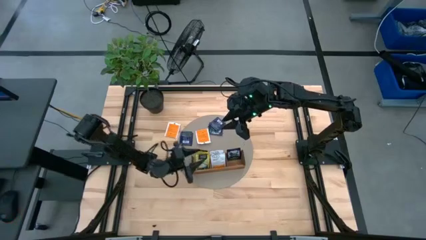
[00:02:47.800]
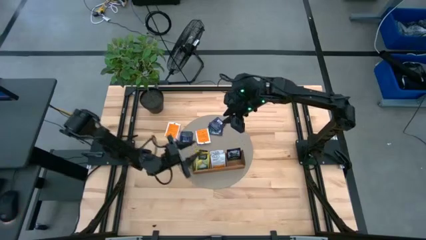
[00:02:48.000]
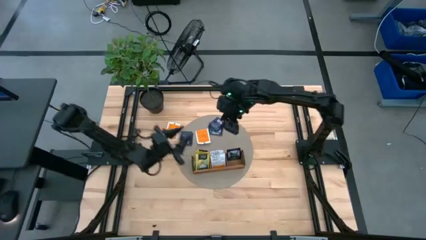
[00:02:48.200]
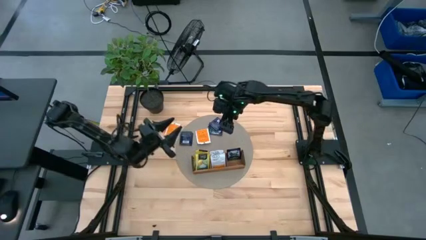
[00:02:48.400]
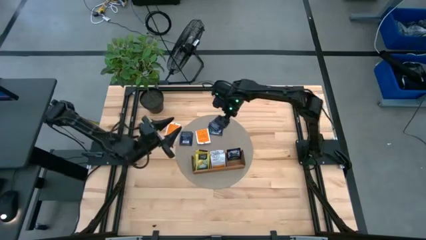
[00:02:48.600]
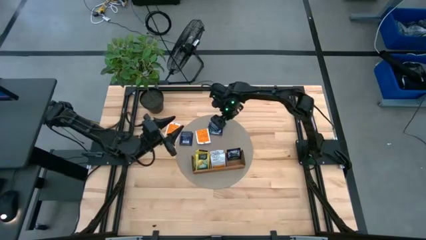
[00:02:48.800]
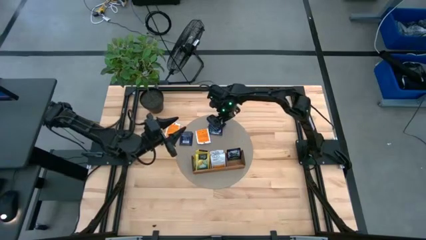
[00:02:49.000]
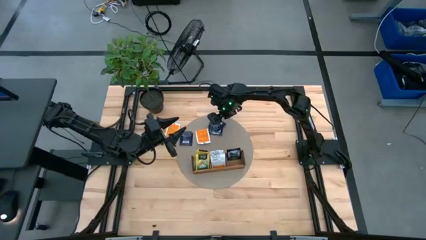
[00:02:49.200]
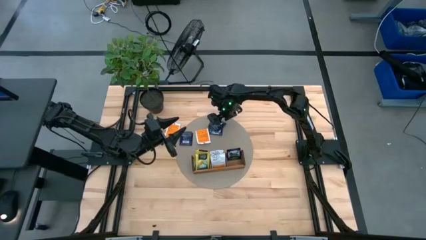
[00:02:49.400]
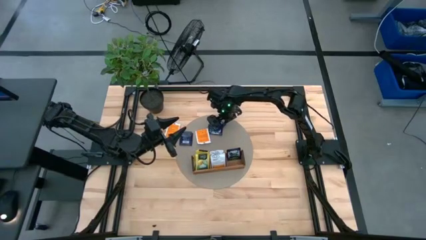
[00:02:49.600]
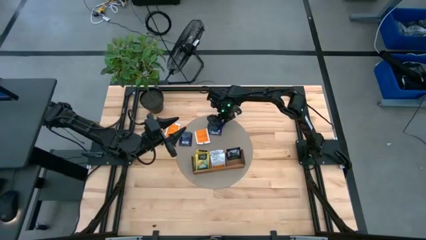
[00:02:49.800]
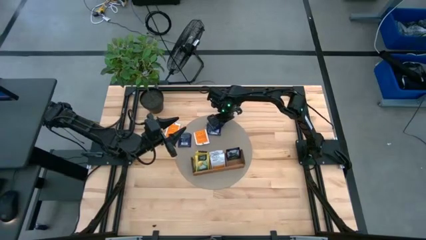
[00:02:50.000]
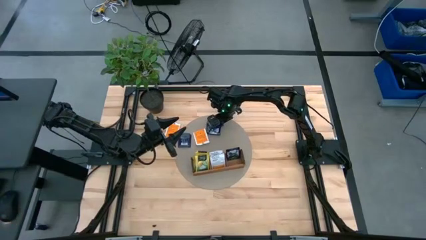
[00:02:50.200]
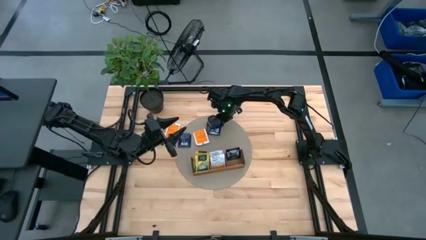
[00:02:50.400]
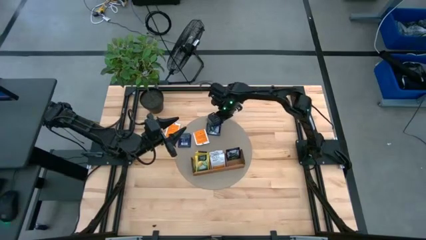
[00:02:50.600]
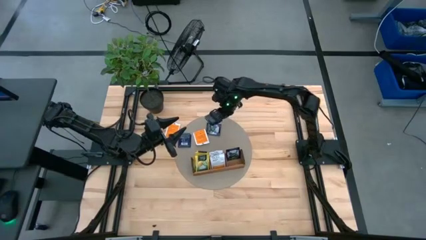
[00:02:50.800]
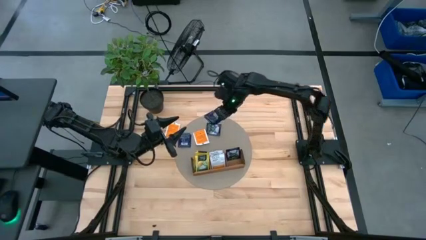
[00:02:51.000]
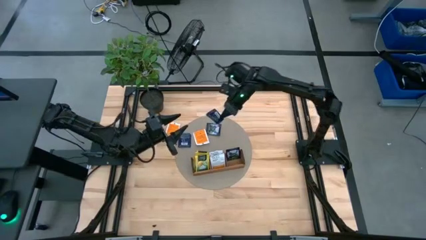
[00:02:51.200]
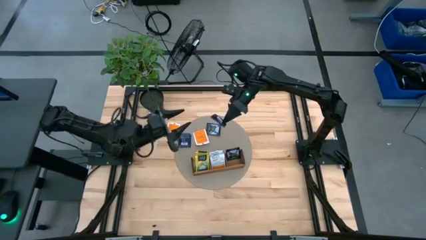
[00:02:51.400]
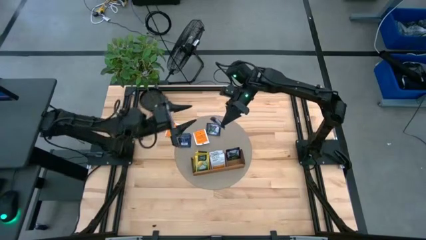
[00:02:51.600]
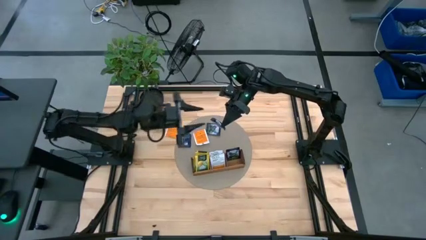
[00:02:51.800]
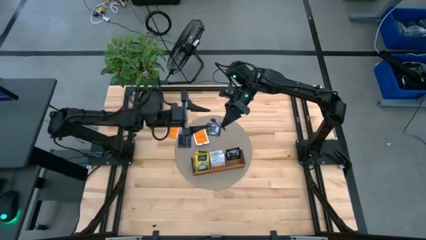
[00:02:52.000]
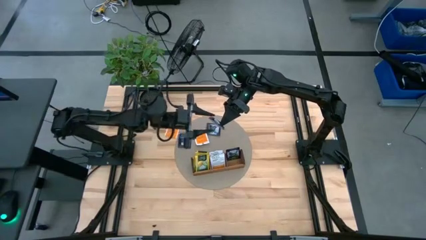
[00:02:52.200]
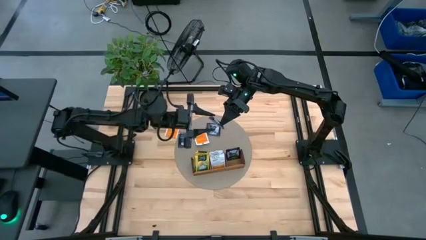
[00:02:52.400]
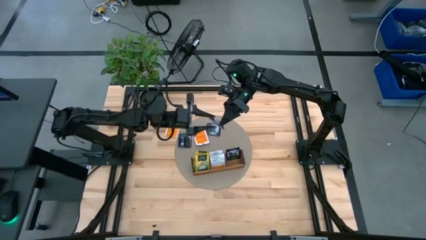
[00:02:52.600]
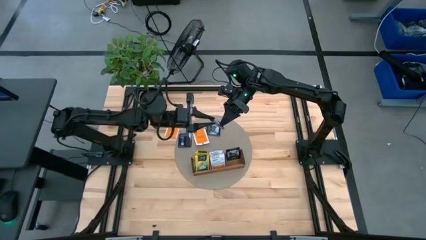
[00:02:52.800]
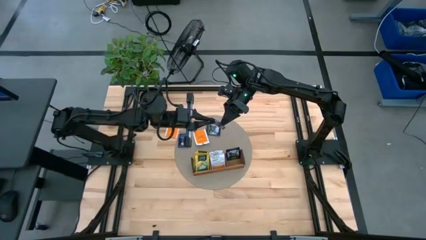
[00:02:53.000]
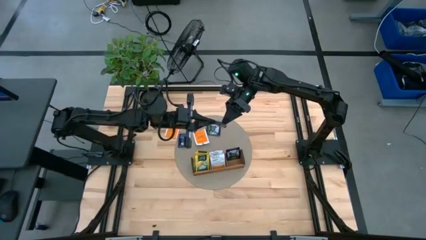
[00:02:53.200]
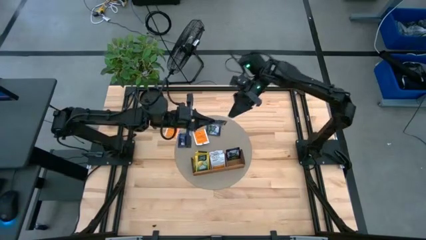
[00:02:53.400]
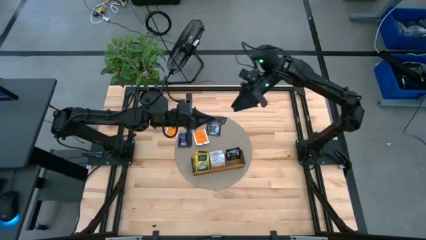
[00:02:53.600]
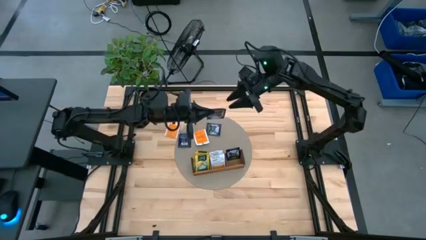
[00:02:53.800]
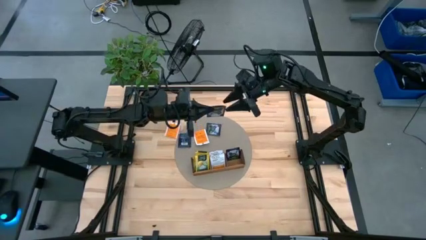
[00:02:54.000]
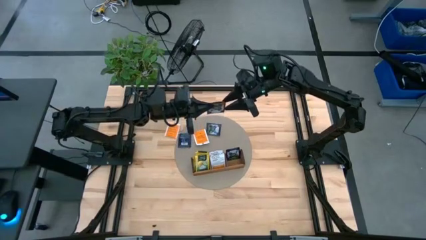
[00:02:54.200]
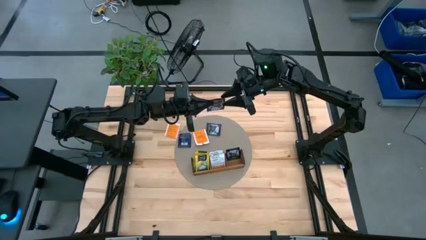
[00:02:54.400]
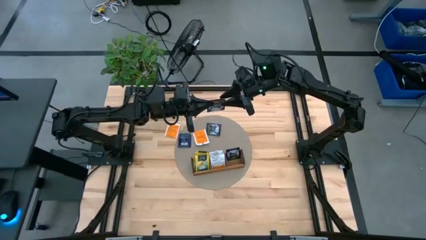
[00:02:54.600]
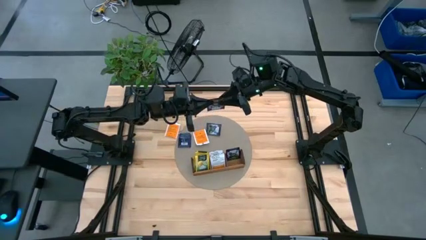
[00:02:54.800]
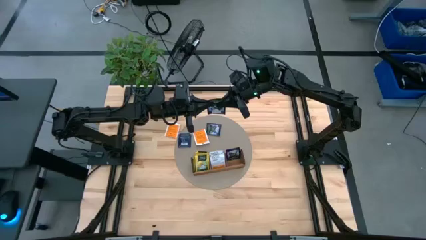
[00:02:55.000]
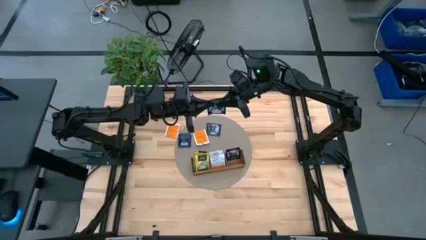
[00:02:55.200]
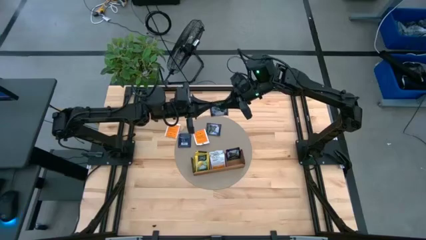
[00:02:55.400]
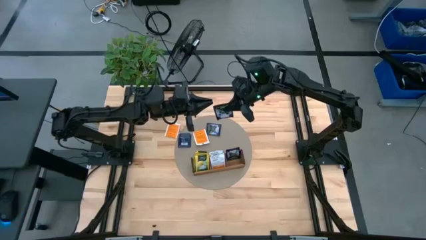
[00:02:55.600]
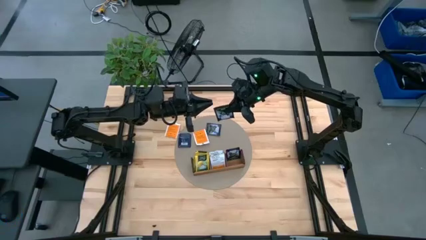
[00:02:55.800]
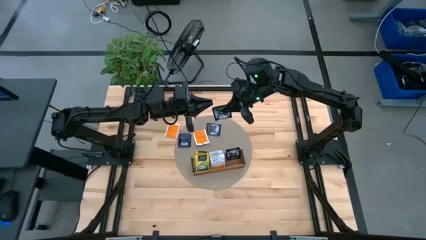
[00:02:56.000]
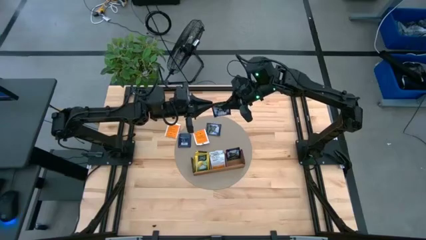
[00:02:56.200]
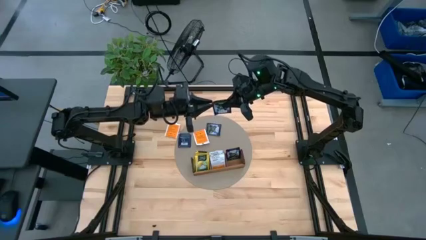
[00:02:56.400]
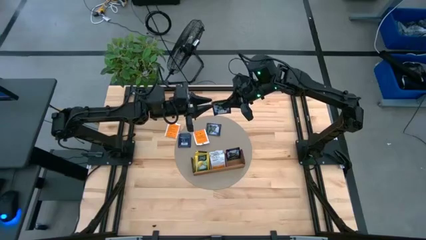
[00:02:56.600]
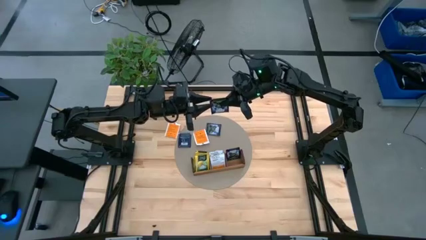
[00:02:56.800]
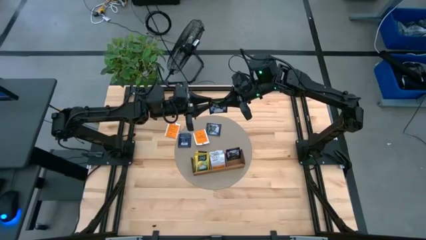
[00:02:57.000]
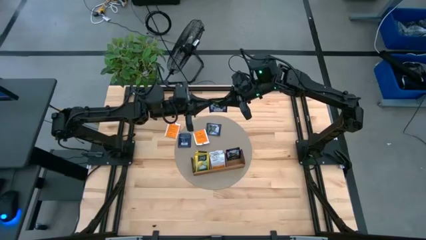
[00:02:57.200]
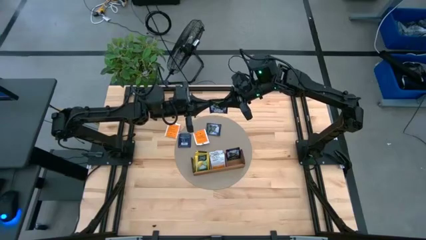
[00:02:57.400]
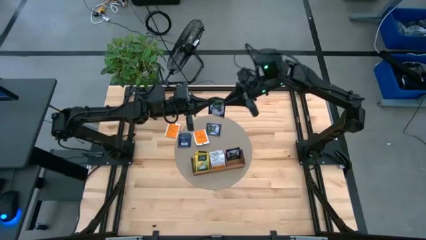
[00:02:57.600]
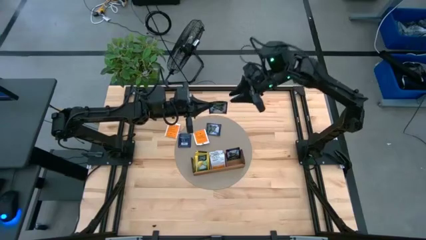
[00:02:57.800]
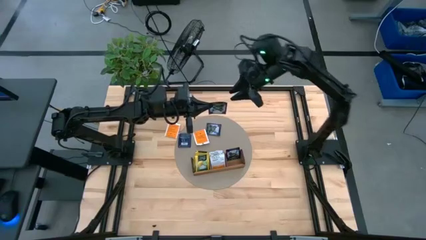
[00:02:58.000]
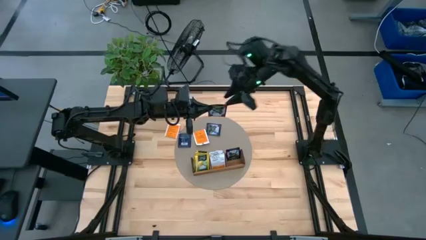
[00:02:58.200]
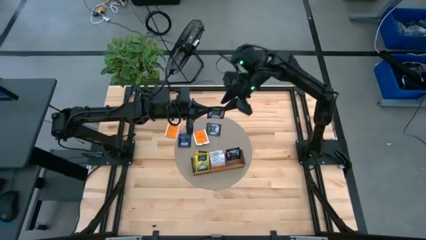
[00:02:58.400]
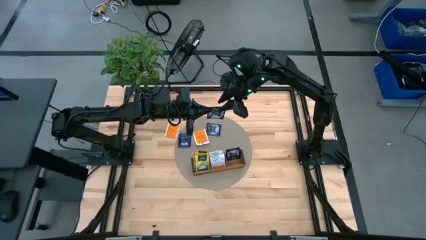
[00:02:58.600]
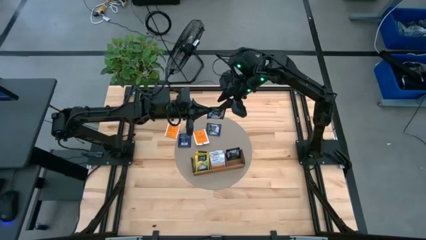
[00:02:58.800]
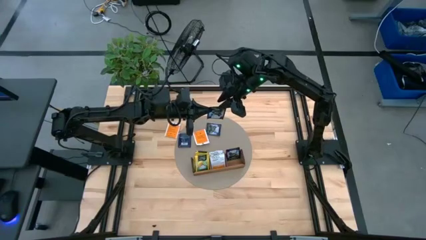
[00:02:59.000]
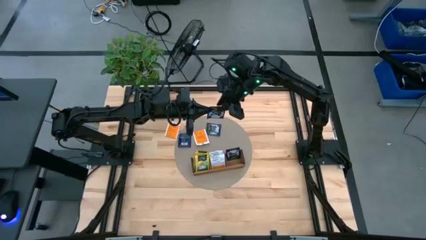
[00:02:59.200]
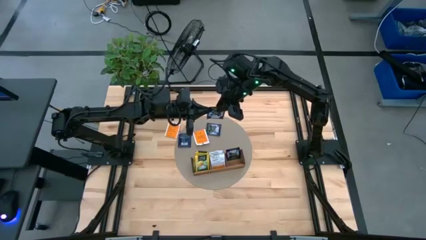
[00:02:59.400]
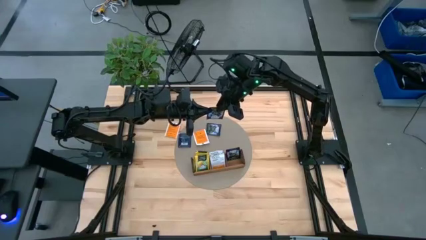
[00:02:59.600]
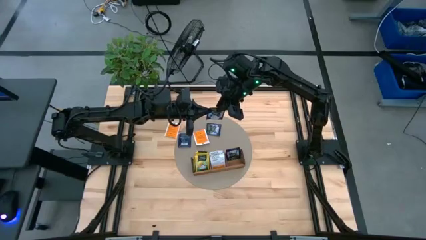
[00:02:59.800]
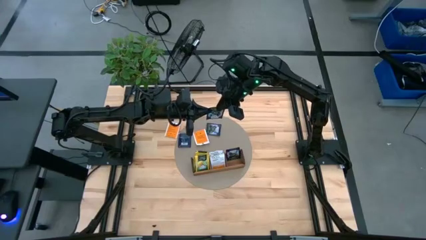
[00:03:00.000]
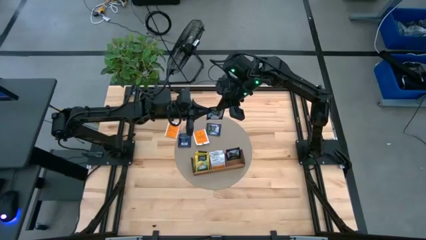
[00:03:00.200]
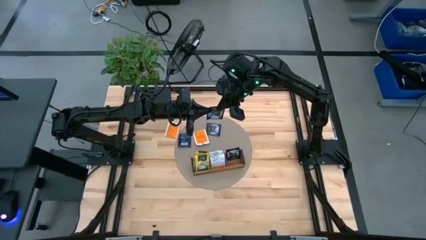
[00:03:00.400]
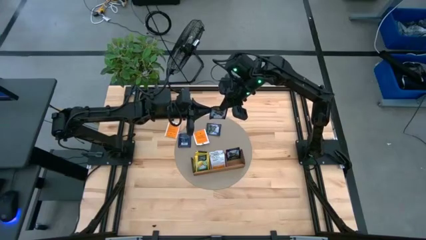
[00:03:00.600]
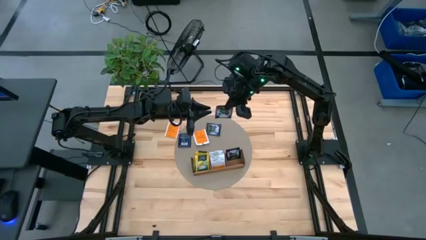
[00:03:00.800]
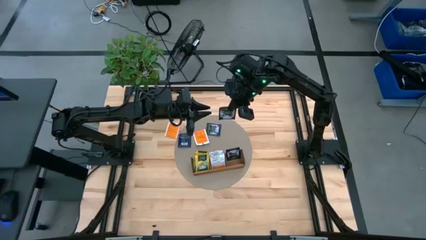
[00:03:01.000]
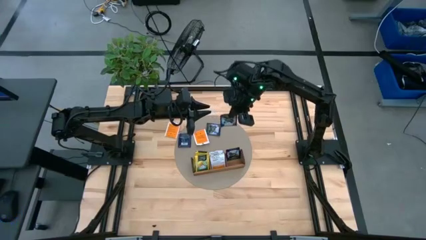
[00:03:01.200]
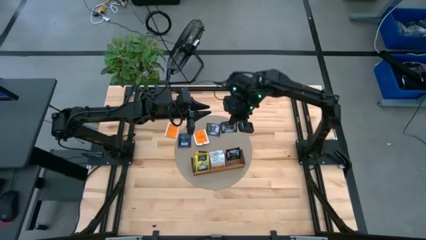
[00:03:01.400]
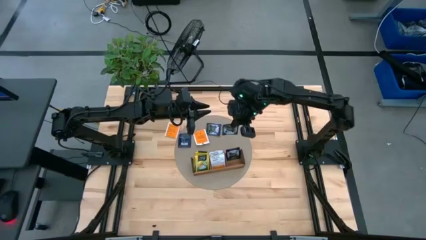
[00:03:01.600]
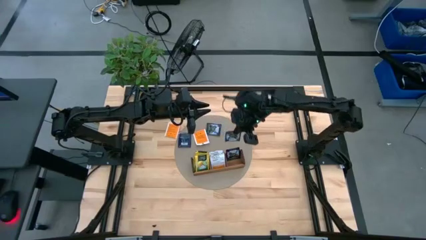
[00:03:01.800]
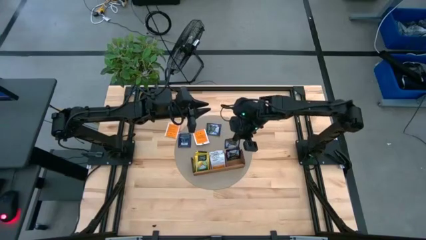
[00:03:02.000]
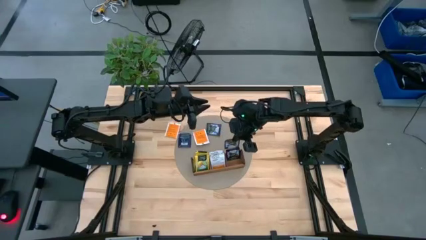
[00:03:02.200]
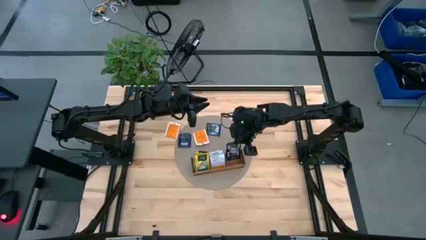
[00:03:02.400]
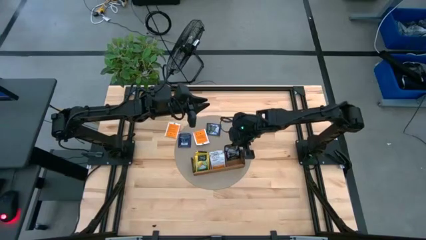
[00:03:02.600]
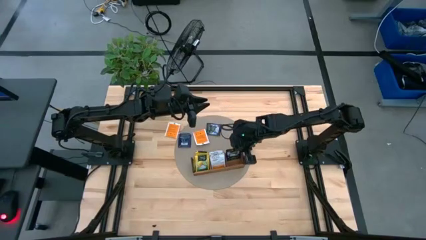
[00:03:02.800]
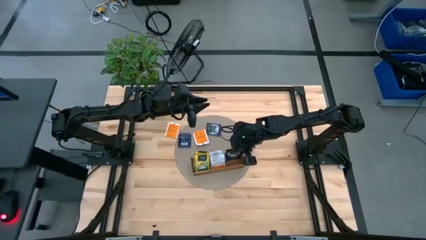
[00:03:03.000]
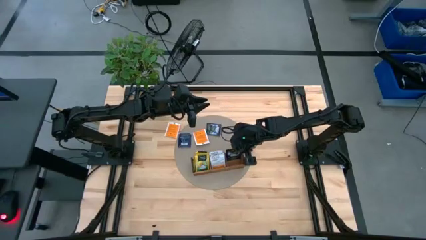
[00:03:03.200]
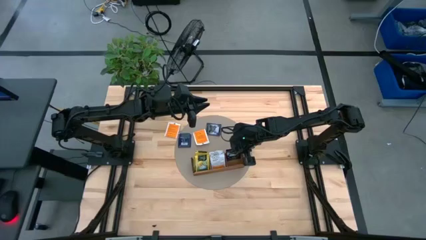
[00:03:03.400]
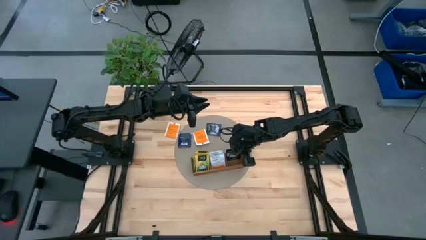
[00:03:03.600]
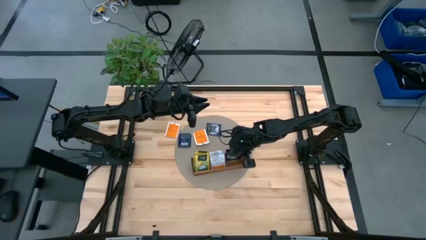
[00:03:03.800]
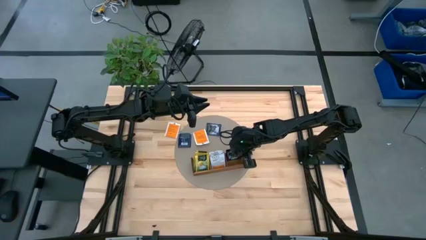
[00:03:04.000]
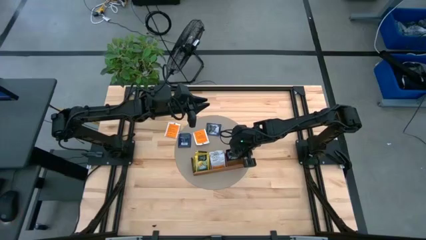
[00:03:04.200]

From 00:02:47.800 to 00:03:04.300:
Task: Pick & Place Tea
Put the violet tea bag into the right section of the wooden organizer
